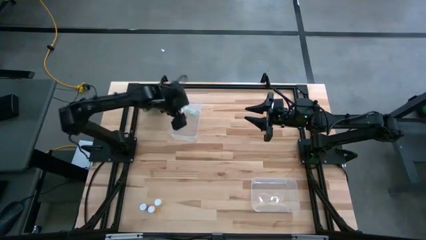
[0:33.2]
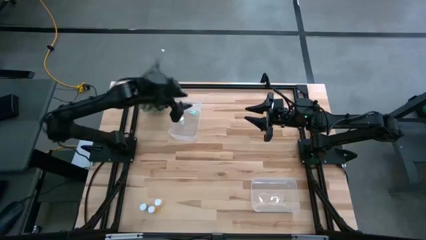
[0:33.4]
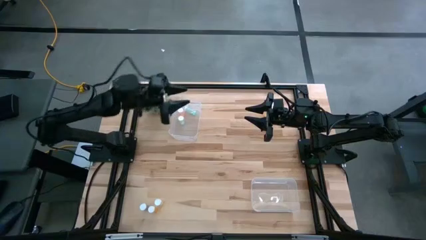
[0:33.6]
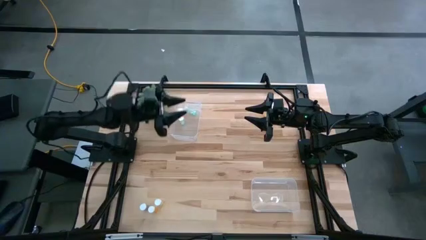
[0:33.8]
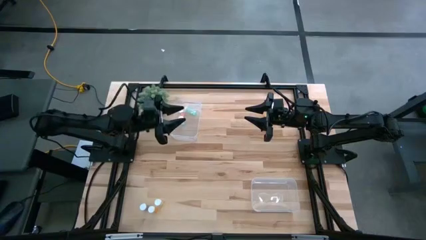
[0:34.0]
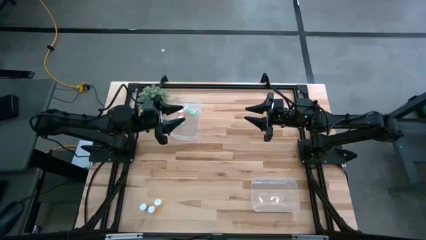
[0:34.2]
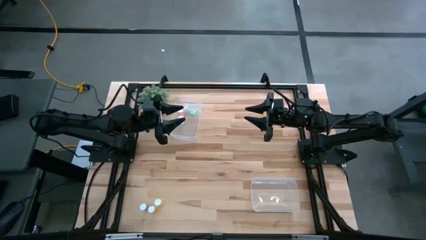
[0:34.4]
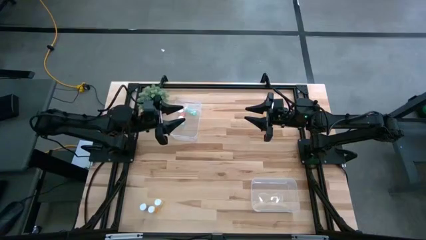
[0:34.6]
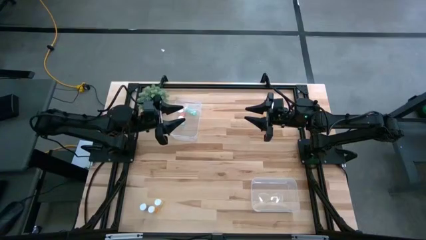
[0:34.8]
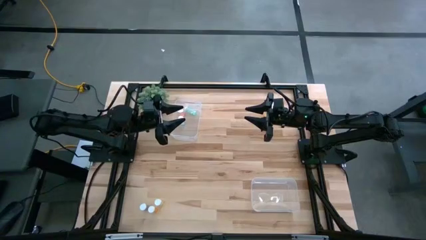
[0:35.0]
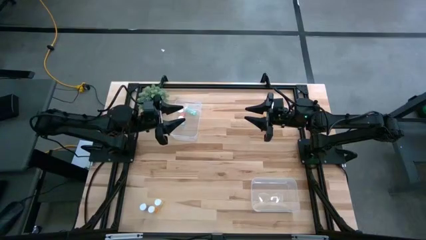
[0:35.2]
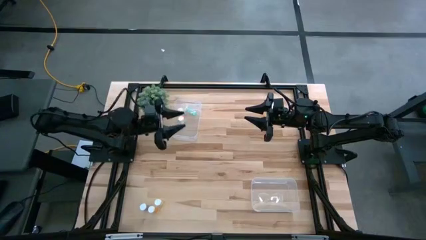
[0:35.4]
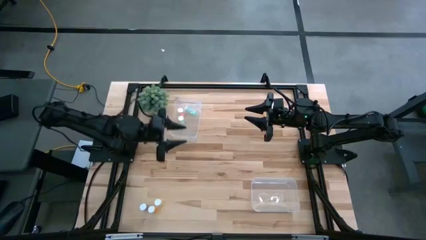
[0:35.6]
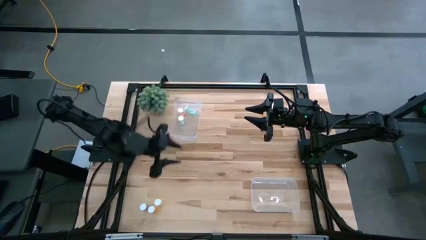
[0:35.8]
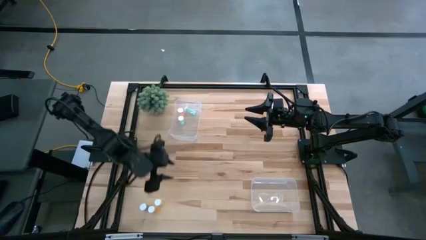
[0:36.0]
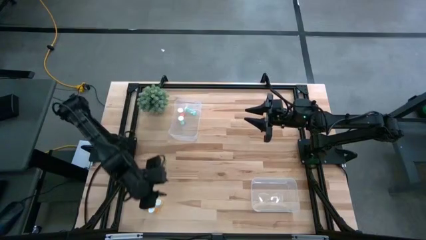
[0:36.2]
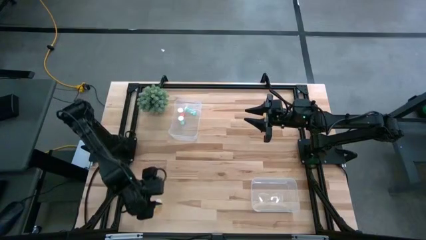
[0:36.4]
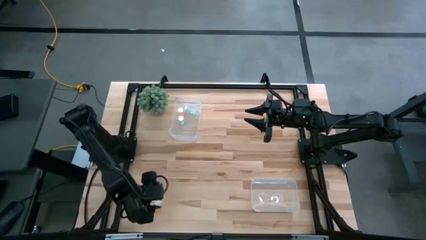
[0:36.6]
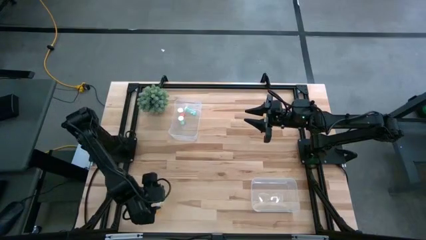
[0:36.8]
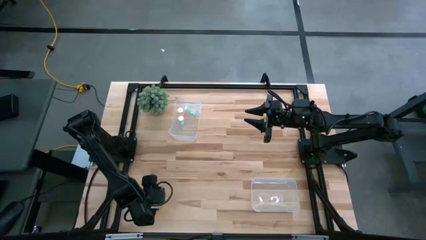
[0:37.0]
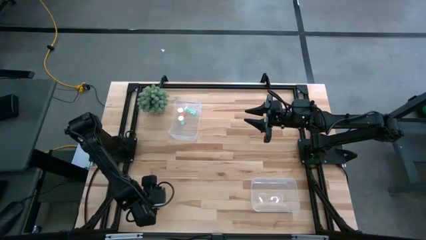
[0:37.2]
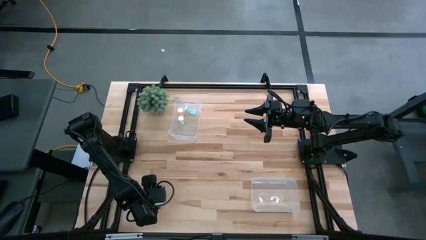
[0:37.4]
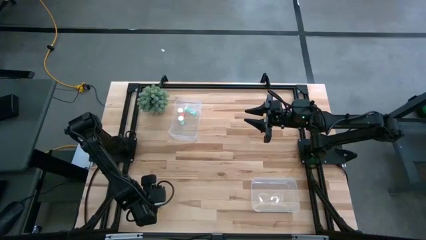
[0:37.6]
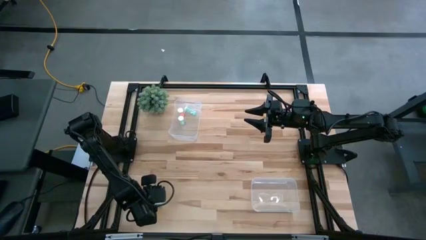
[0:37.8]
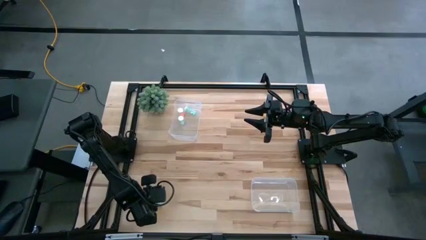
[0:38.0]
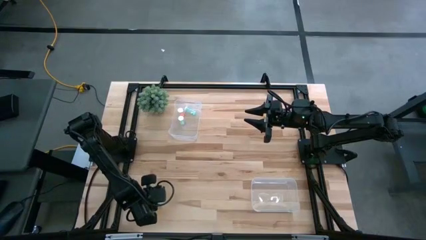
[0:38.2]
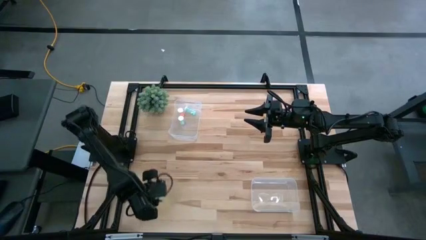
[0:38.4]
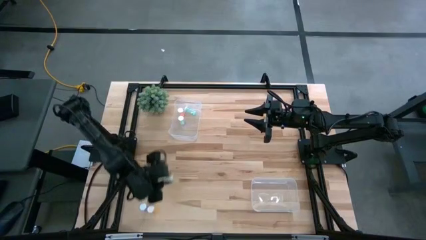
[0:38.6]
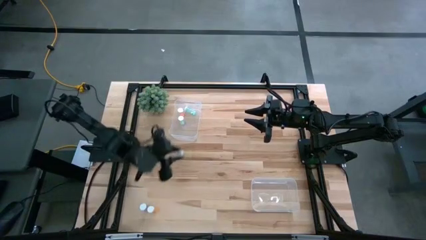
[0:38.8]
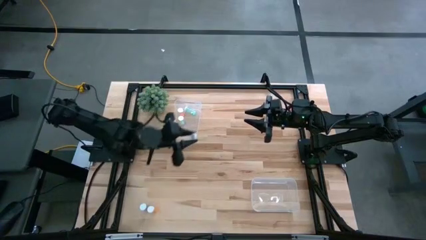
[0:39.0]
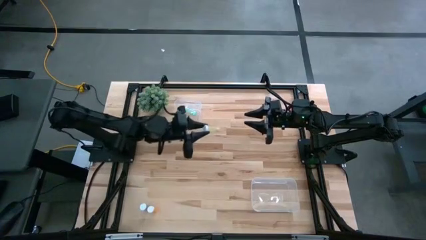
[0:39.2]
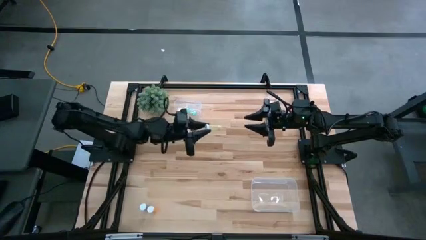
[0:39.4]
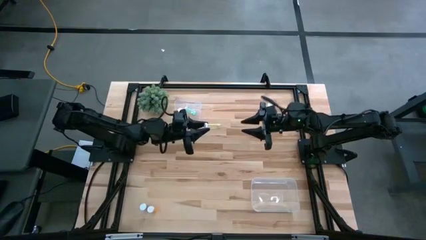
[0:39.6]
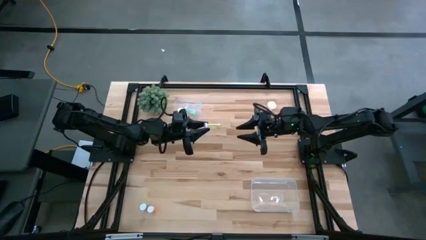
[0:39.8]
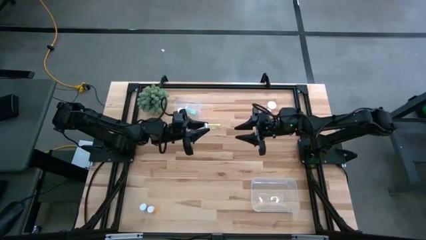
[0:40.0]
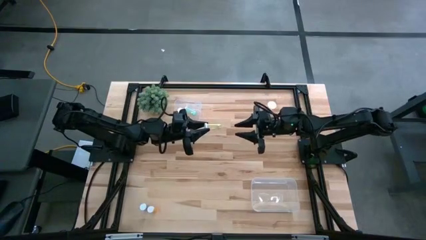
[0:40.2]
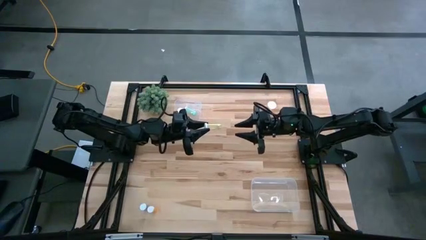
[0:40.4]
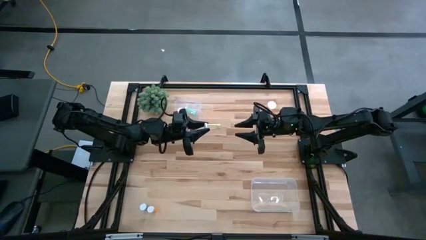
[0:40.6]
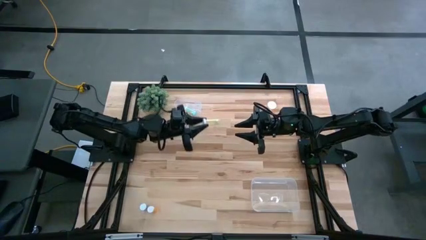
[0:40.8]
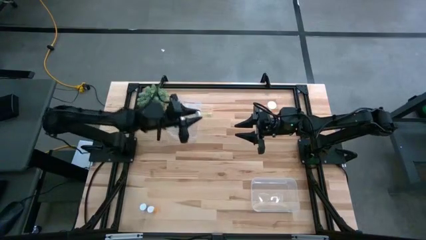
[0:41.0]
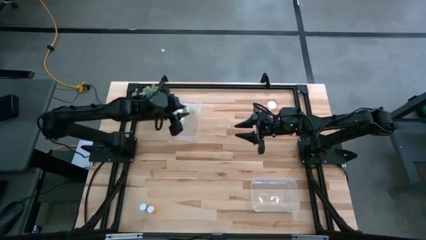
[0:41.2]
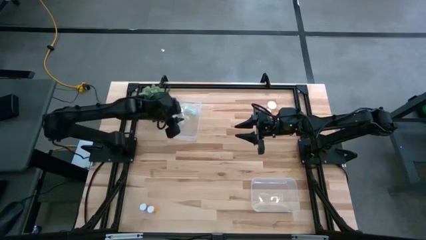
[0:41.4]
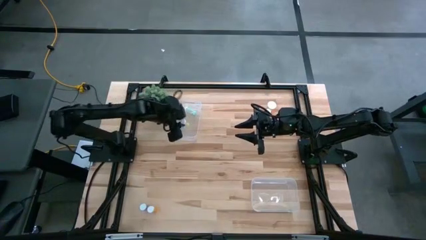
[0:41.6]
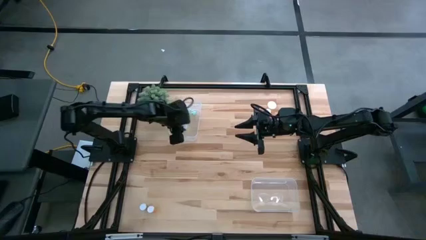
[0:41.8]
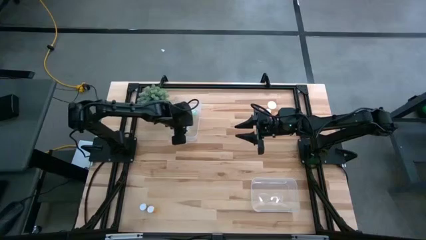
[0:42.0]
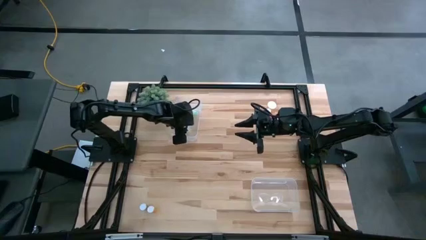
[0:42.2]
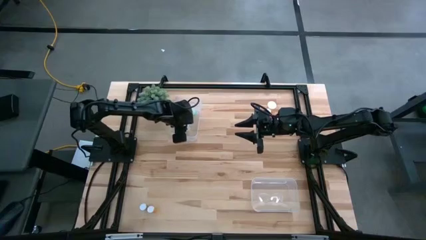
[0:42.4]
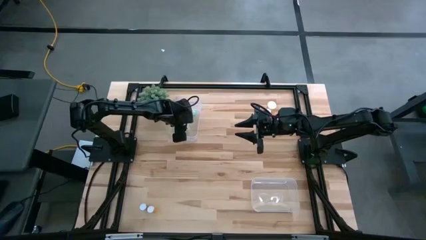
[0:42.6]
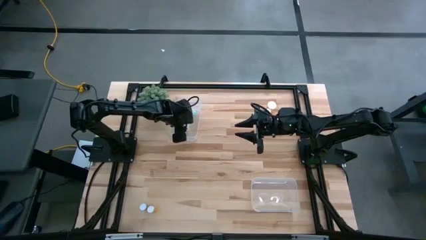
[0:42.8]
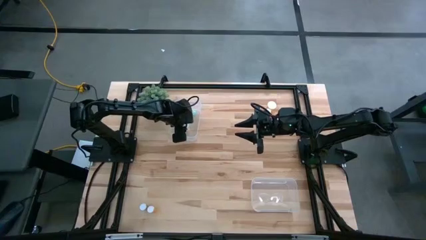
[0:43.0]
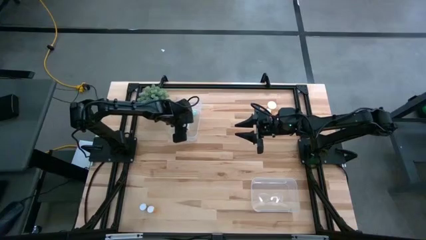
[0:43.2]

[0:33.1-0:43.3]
Task: Pick and place medicine bottles into bin by pill shape (circle, oval)
Put the bottom yellow tablet bottle into the top transparent bin

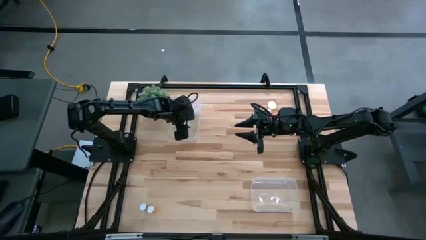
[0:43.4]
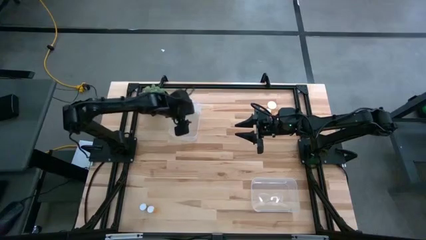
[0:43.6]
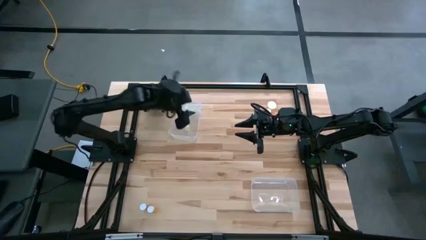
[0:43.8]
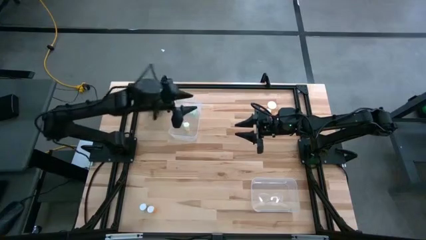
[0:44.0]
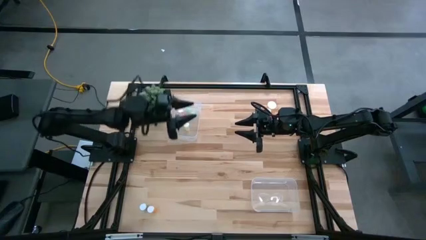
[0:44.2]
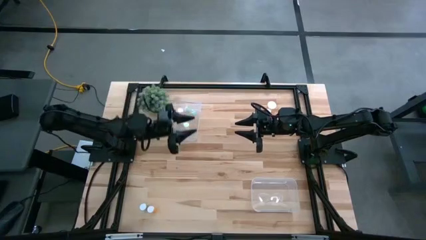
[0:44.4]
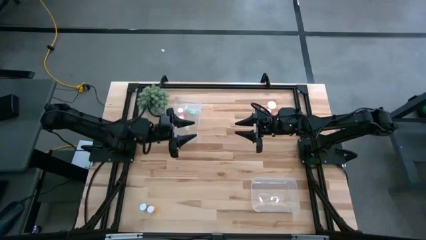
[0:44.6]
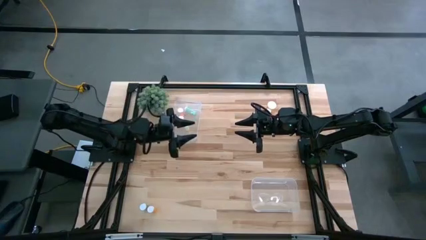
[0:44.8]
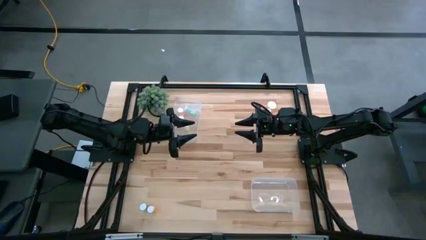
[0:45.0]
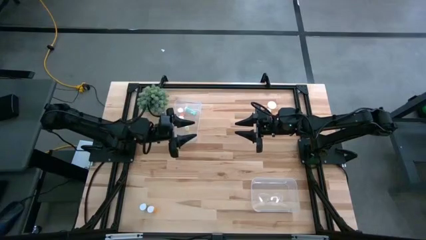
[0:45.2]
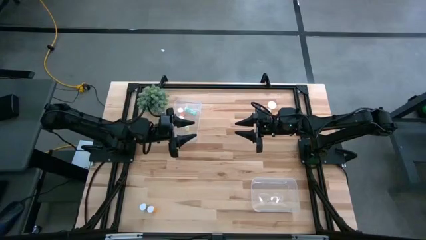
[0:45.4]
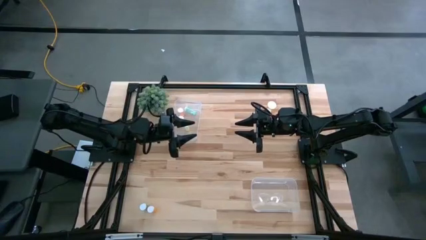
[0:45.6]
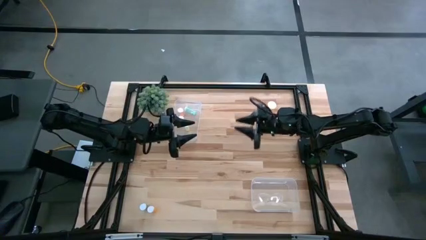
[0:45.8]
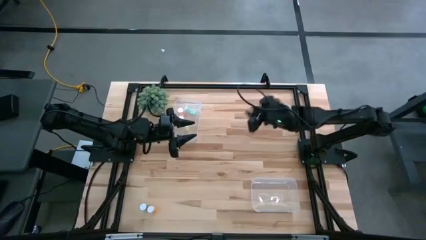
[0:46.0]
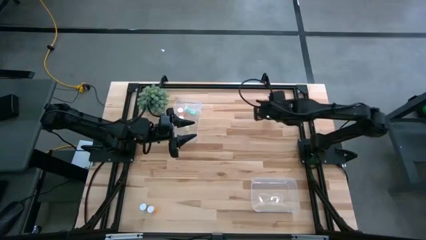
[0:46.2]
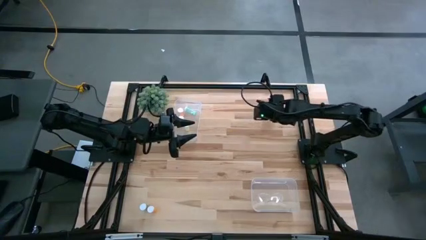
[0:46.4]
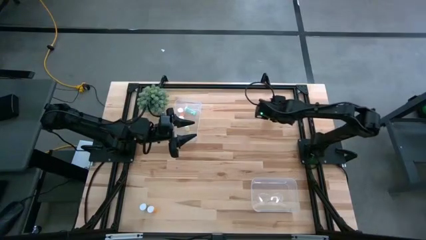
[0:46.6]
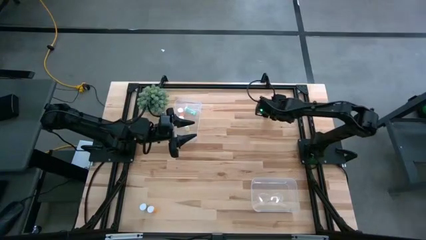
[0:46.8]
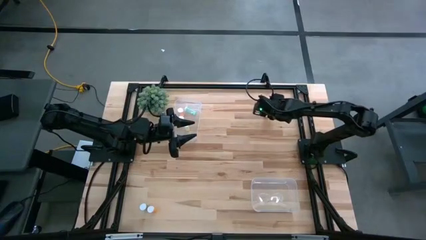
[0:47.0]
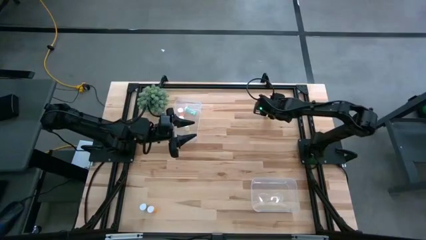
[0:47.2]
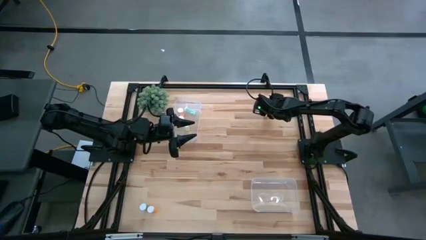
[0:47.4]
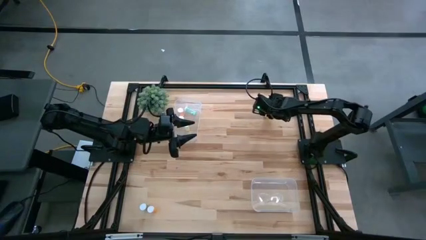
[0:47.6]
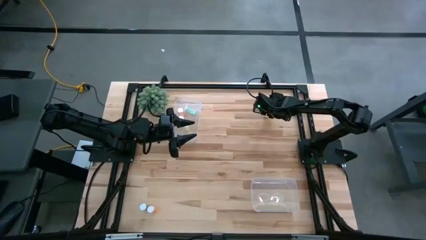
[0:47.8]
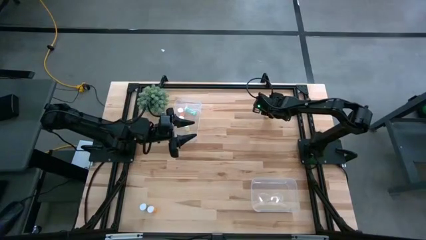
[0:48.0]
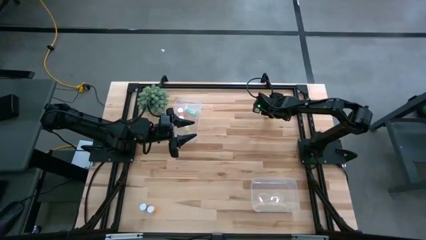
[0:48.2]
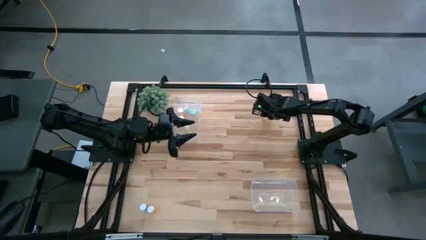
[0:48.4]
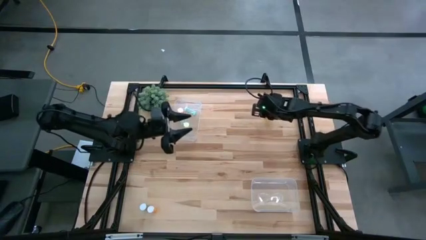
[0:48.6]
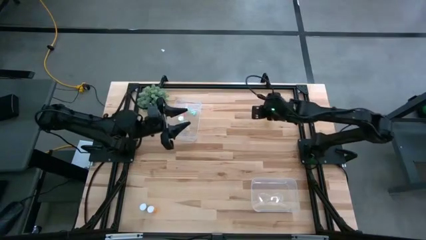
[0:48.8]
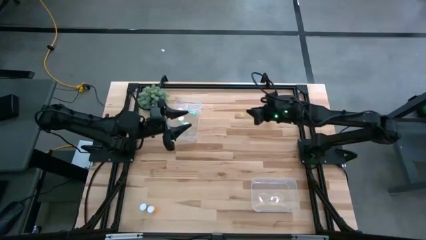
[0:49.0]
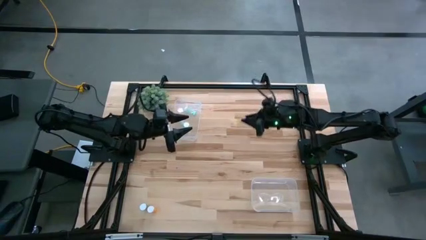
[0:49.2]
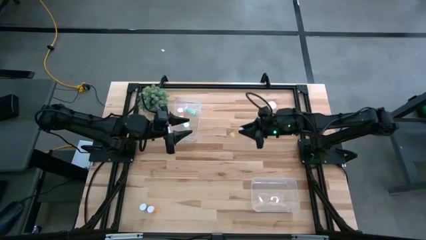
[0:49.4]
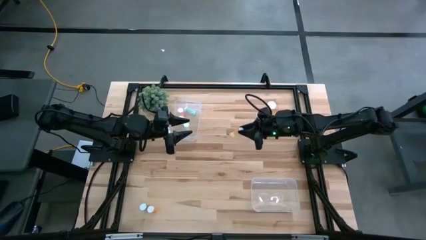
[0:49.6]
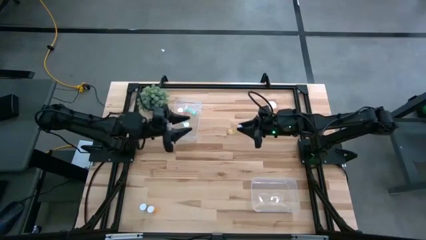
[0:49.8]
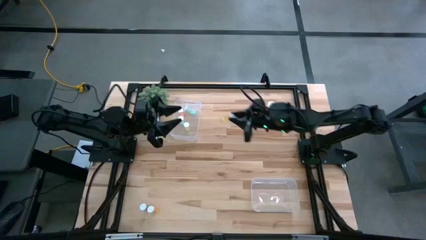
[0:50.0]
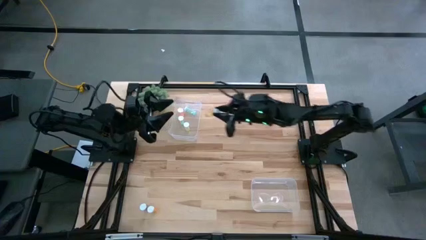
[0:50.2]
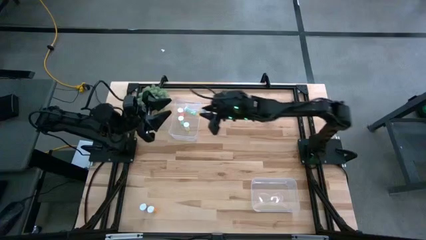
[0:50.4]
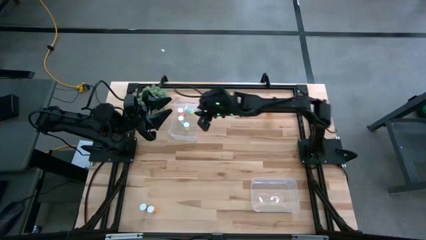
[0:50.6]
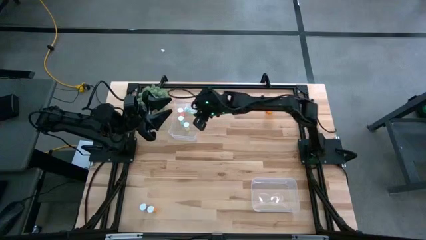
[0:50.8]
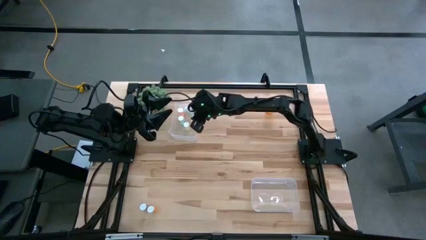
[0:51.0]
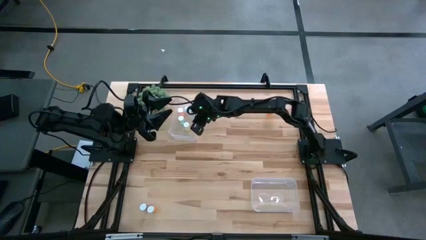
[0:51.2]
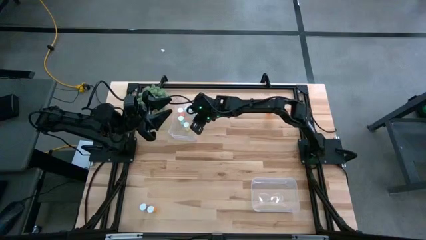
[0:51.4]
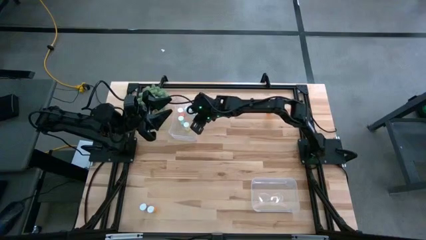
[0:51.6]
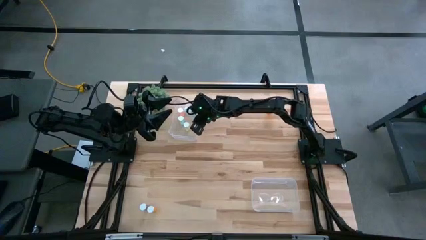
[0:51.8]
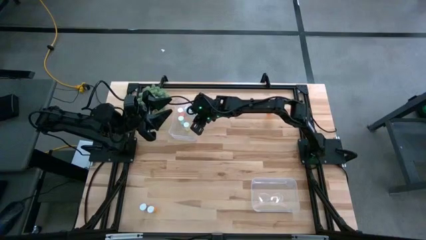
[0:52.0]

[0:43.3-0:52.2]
Put the yellow tablet bottle into the top transparent bin
